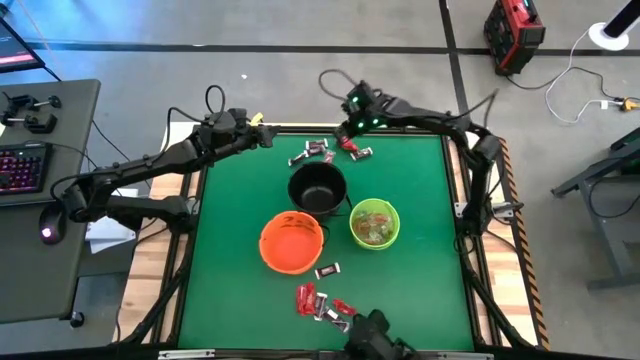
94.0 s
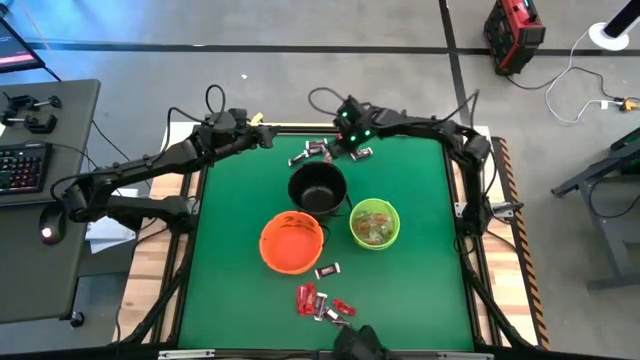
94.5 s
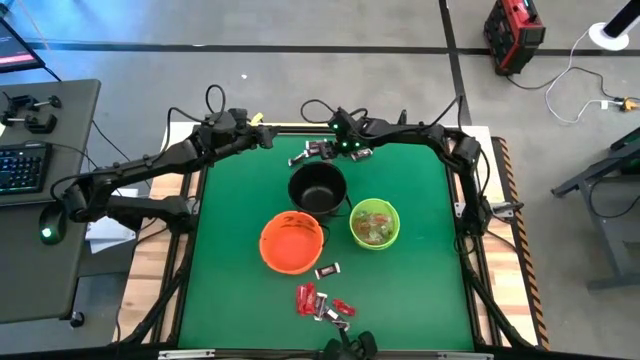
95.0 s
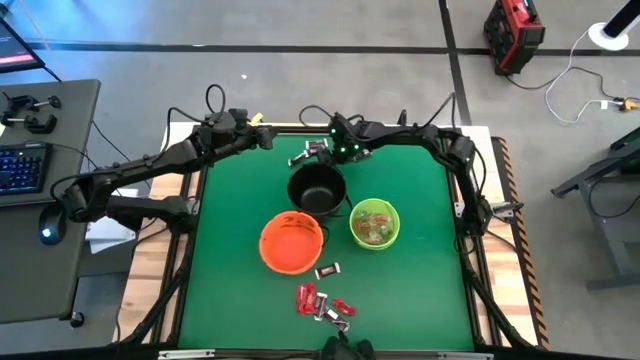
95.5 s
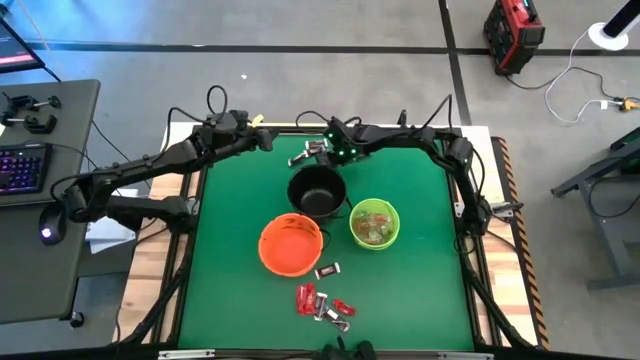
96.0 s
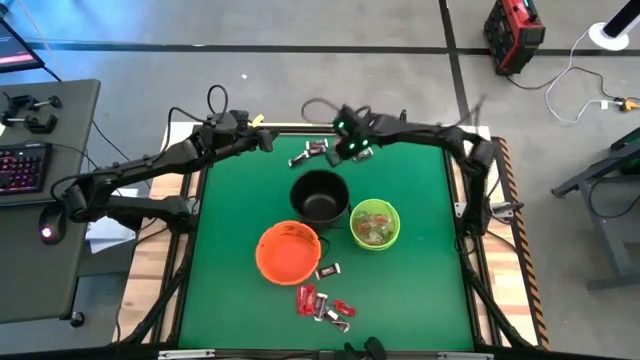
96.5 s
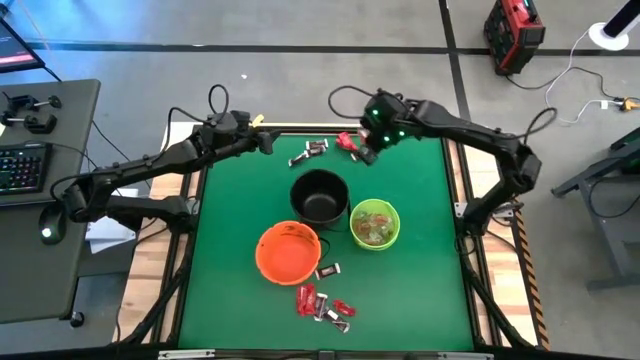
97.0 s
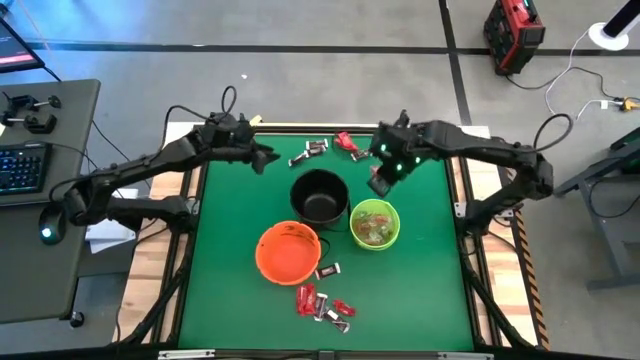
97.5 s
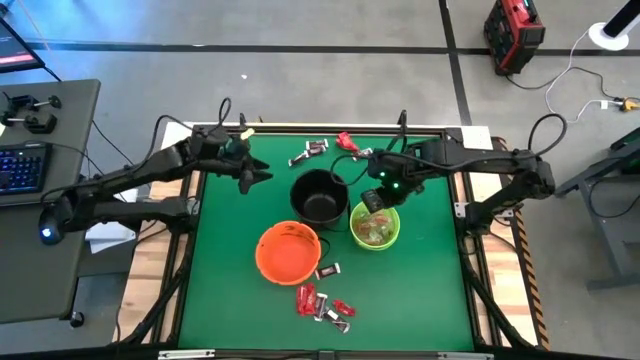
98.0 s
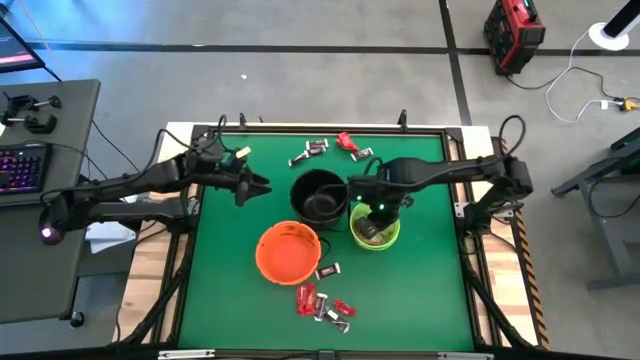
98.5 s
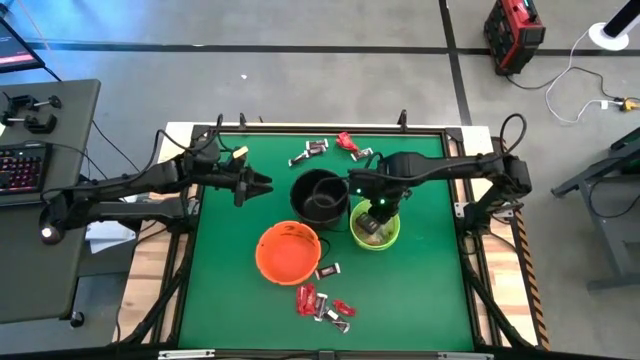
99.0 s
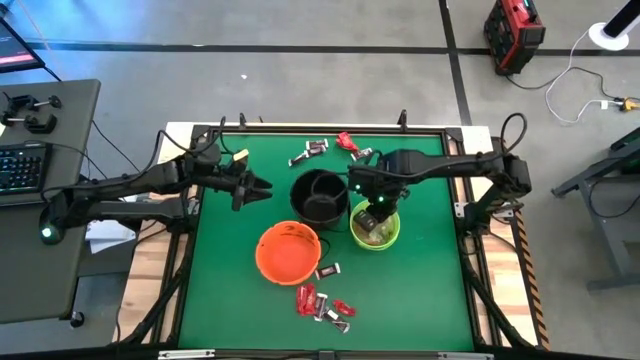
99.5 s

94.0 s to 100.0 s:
Task: Sort candy by brand, put in halloween buckets
Put the orange gummy into the green bucket

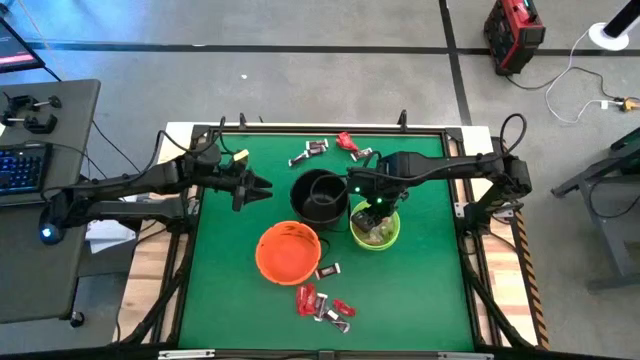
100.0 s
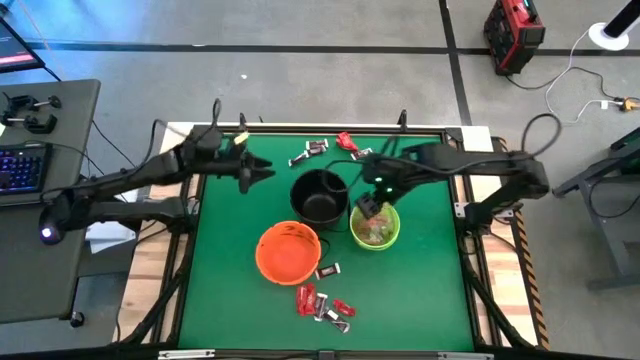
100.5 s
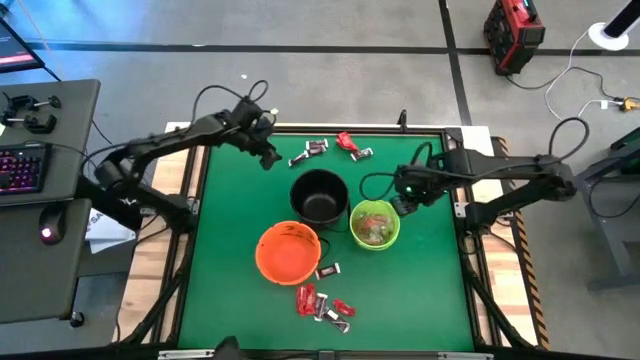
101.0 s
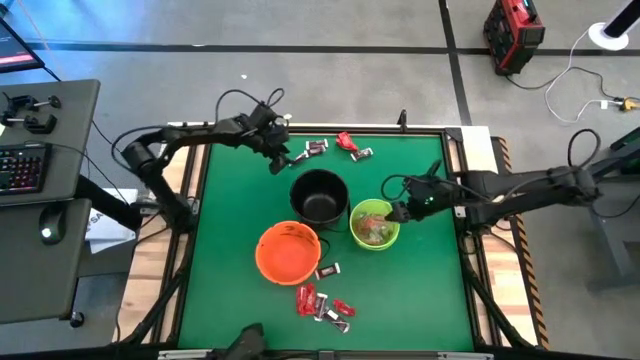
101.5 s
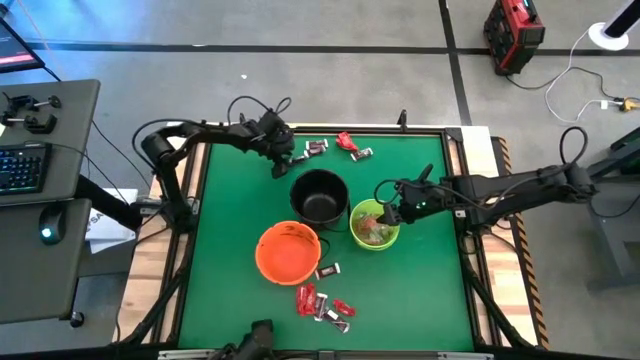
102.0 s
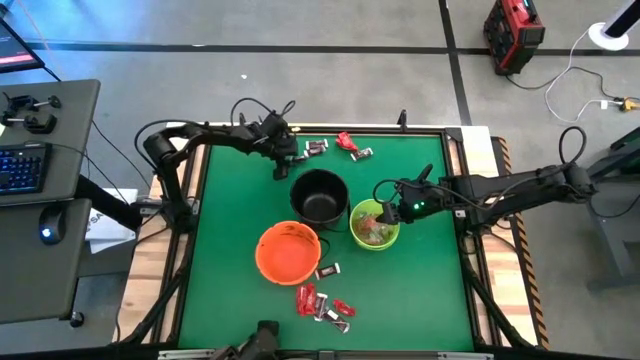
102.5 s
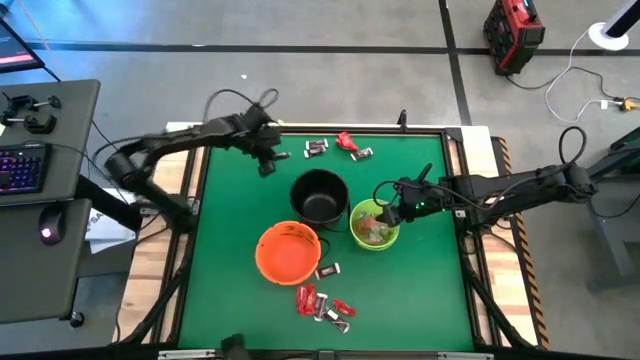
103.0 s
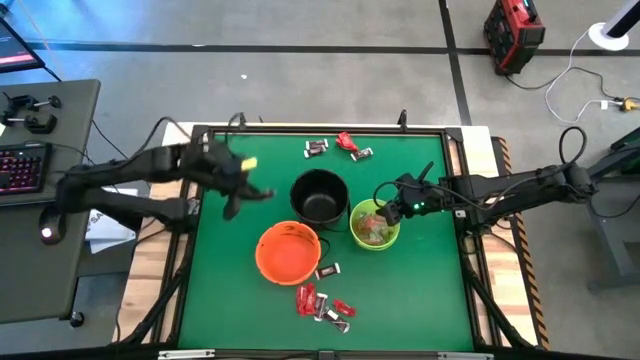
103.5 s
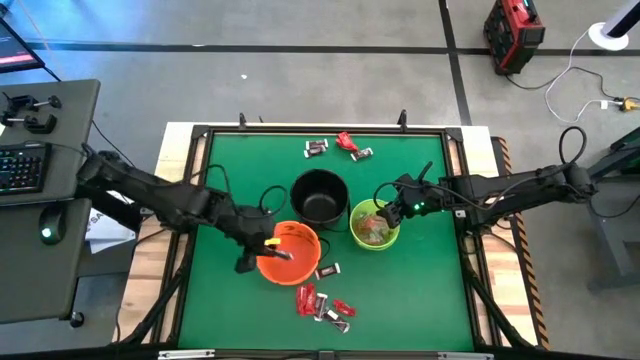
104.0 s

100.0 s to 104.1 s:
Put the brown chocolate bar into orange bucket

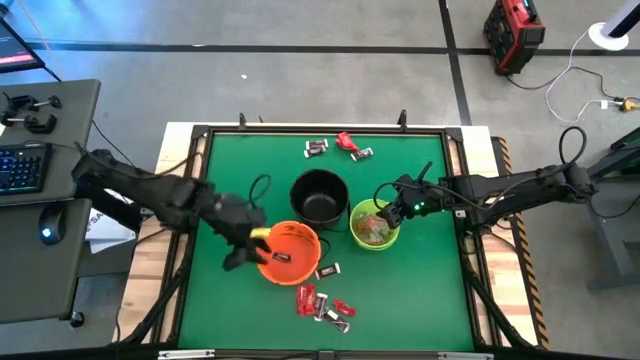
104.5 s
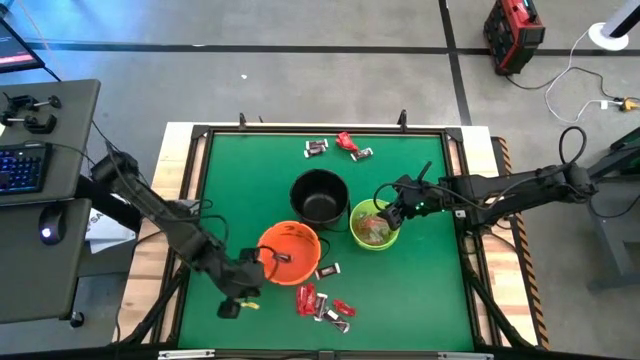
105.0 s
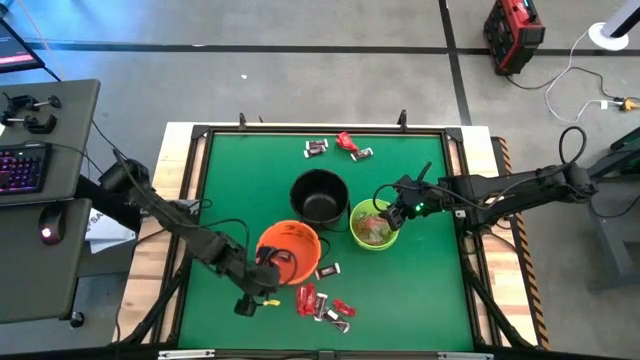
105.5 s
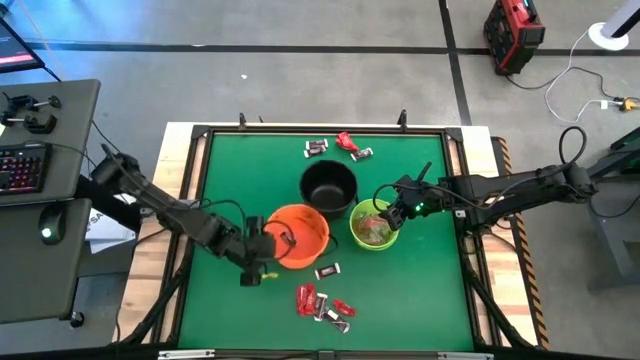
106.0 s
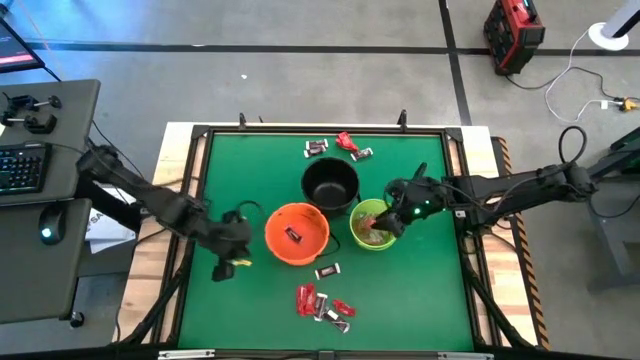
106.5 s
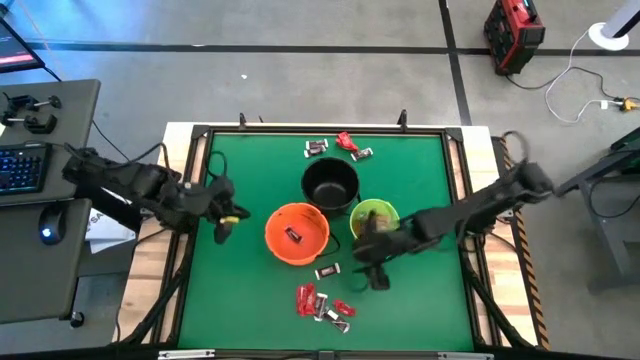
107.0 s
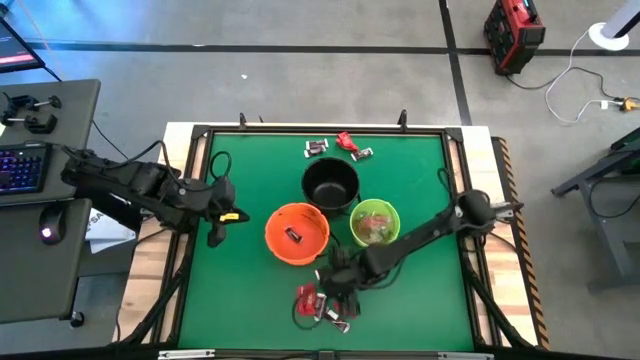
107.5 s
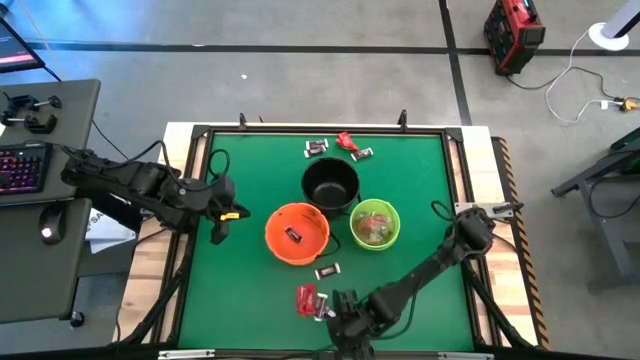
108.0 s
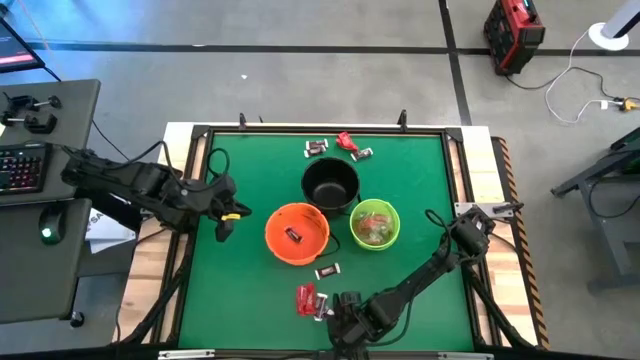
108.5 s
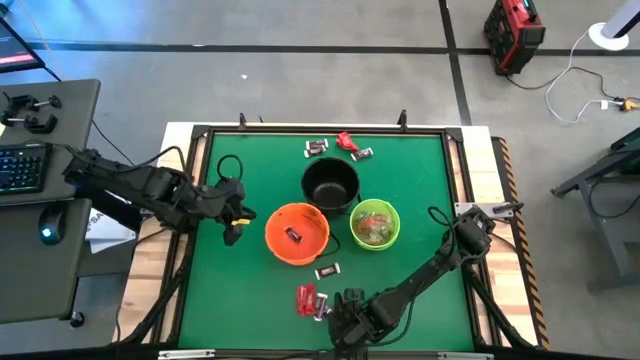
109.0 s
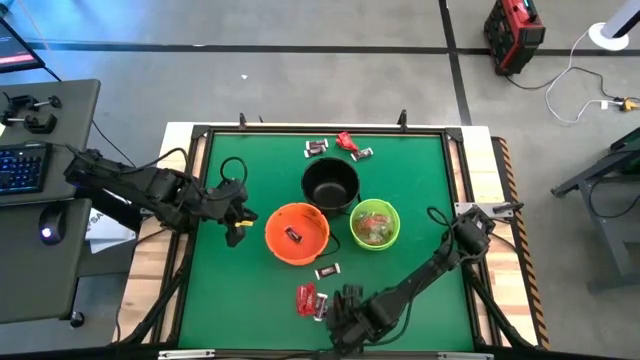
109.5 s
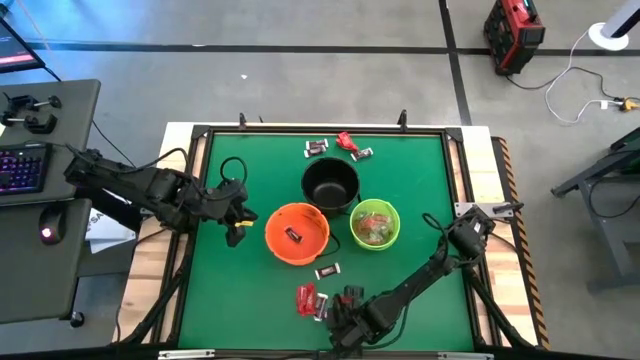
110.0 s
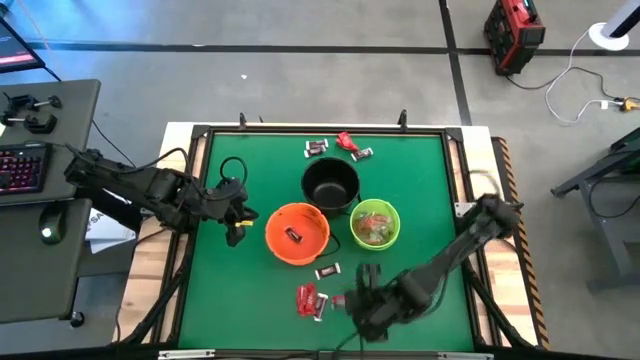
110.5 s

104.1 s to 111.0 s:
Put the brown chocolate bar into orange bucket

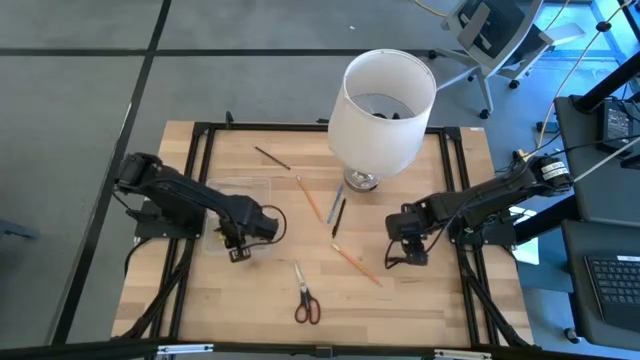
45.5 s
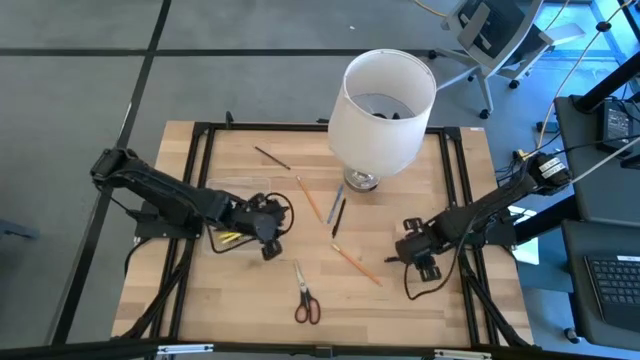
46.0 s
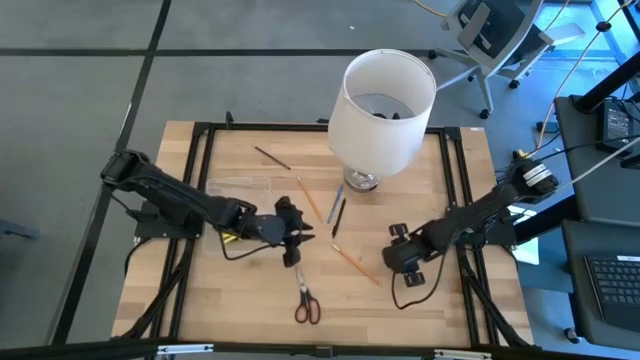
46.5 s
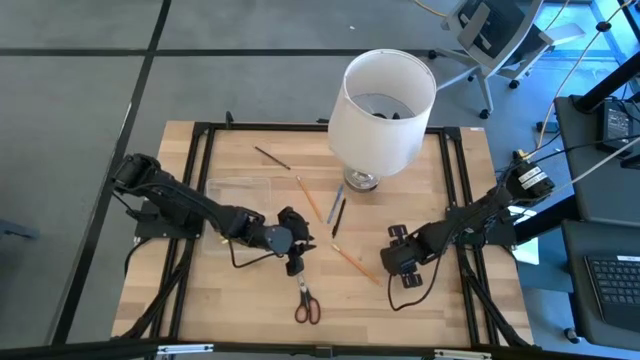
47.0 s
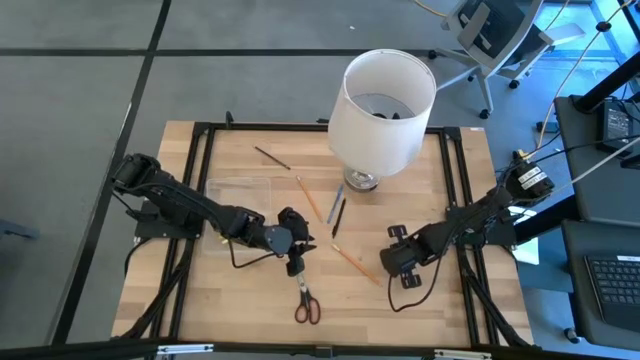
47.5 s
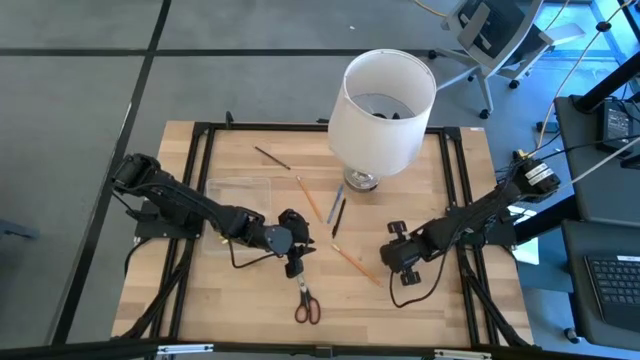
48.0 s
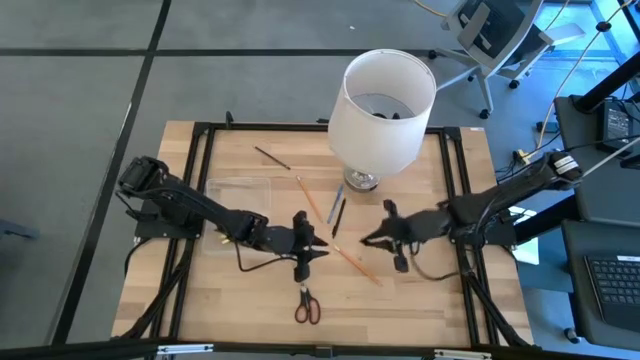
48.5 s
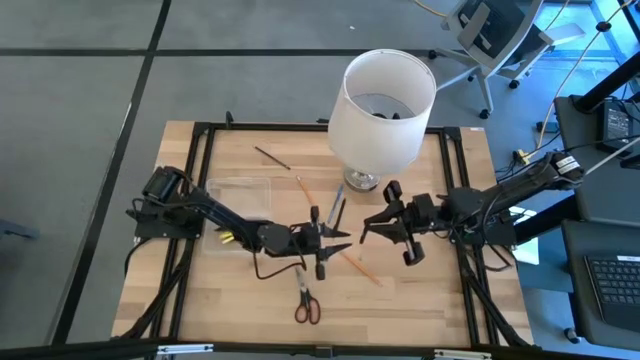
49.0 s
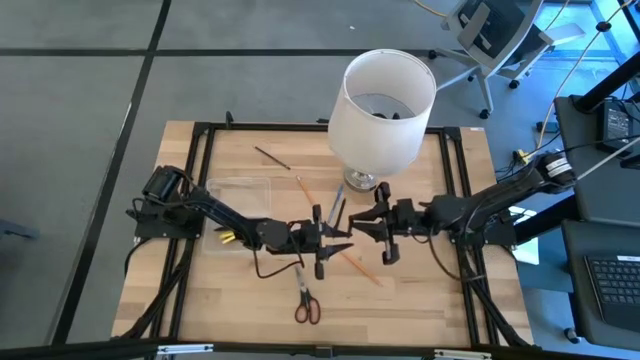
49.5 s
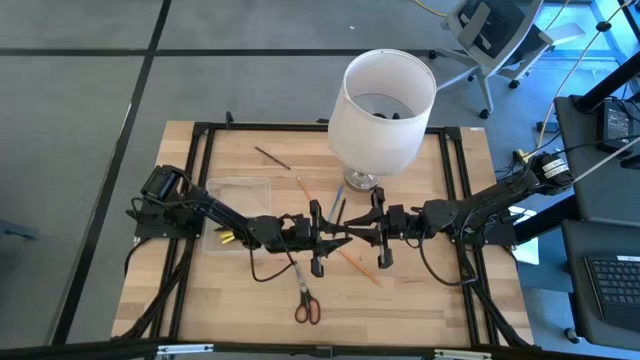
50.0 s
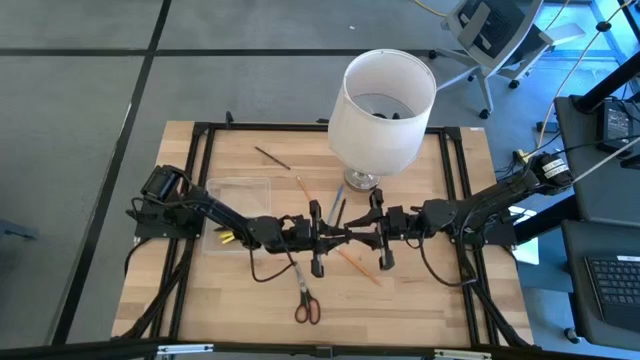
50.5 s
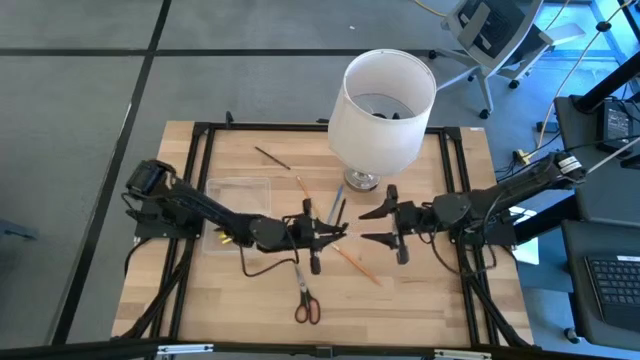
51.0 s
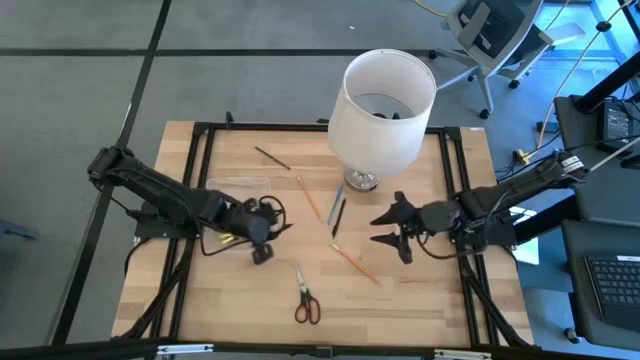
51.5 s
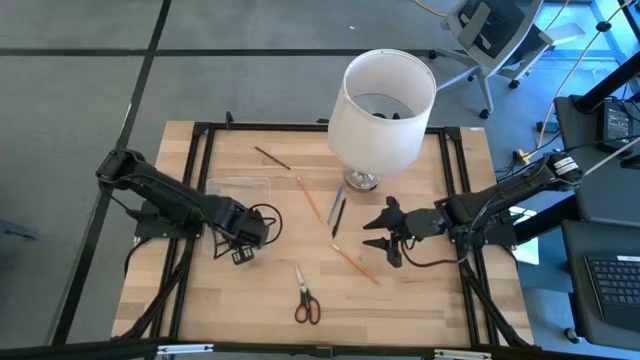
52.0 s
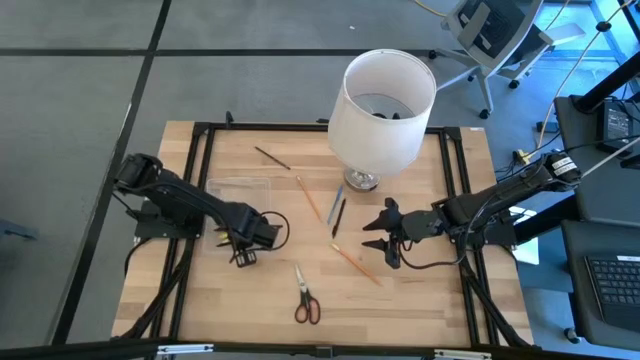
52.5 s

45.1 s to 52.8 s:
Task: Pick & place school supplies into a supply box
Put the black pen into the transparent supply box
